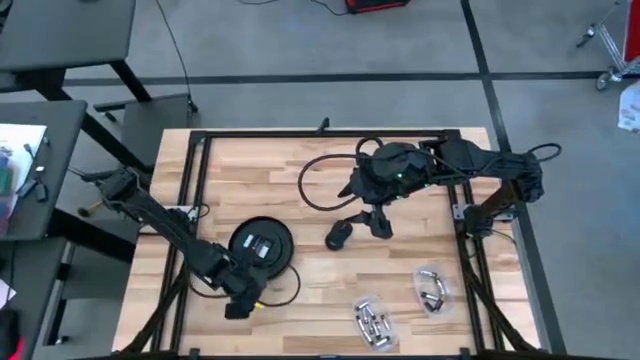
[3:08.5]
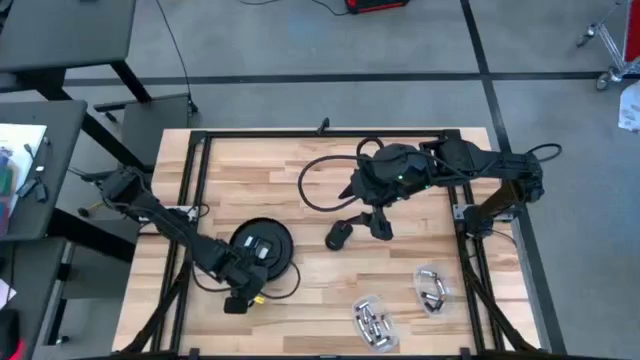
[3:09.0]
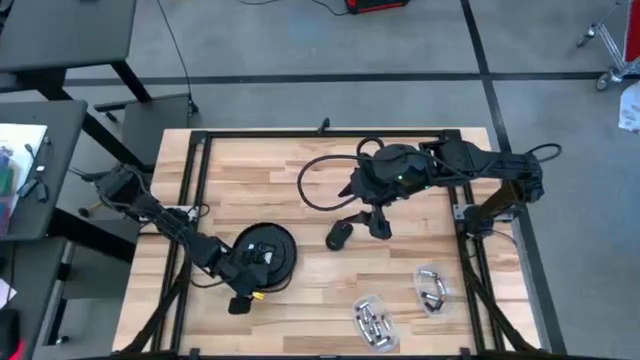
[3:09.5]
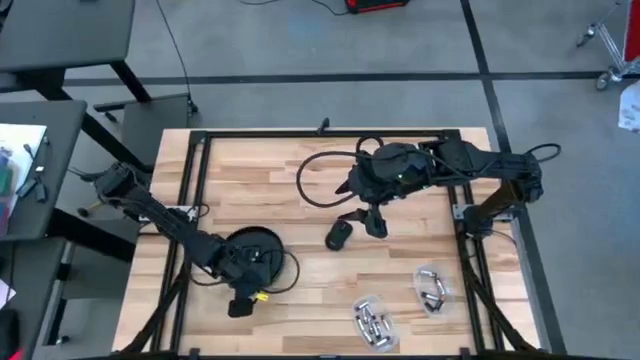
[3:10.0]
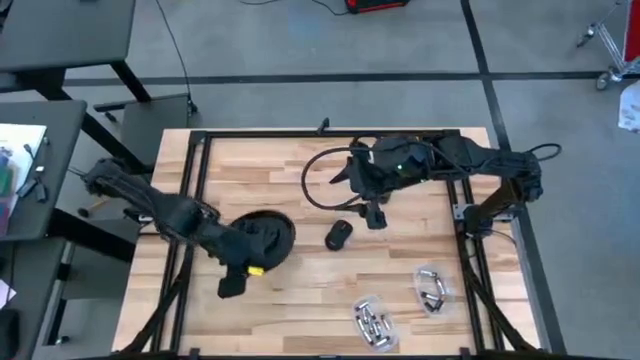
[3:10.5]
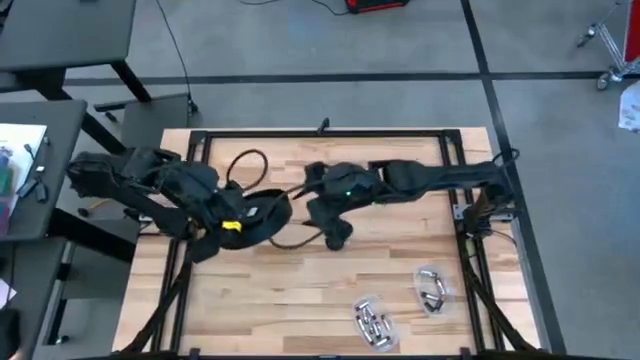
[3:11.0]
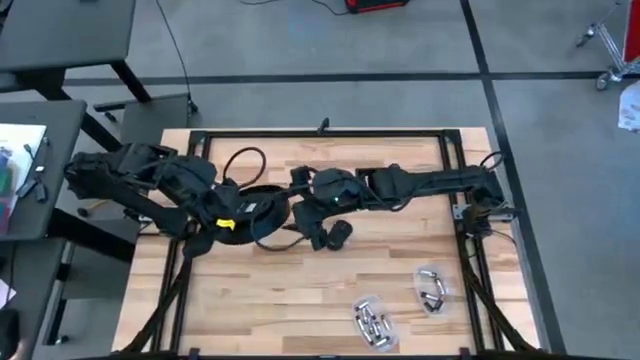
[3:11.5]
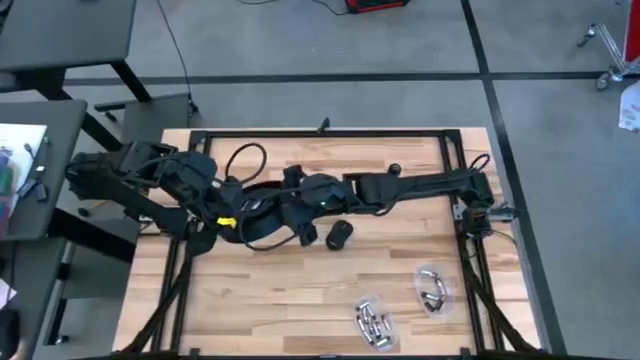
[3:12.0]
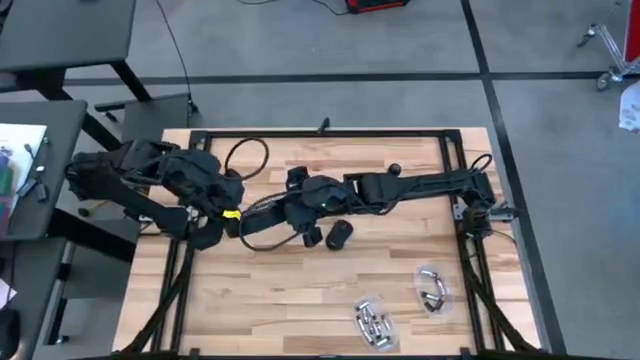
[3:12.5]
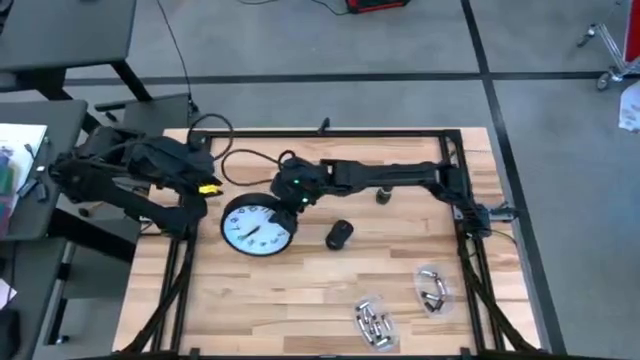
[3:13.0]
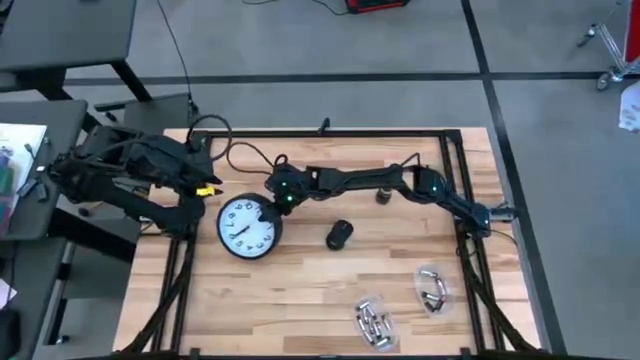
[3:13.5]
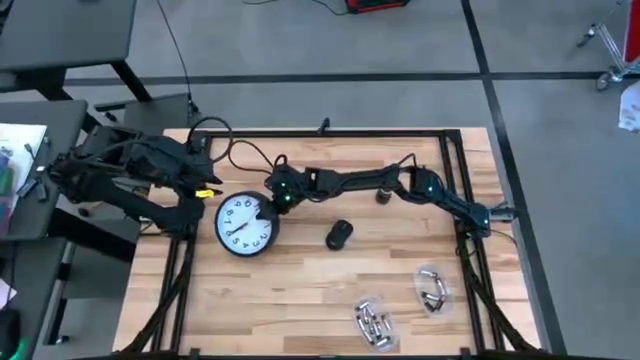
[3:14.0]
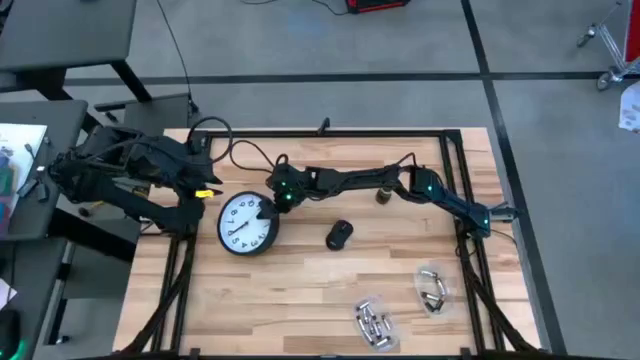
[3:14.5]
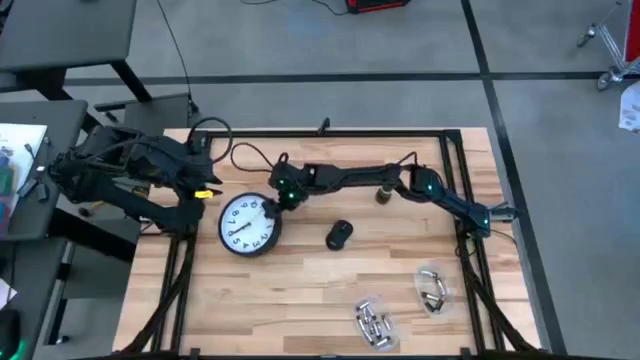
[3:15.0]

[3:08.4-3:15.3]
Task: Insert battery
Adjust the white wall clock

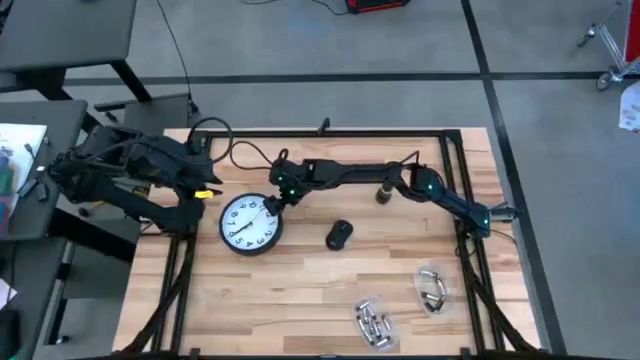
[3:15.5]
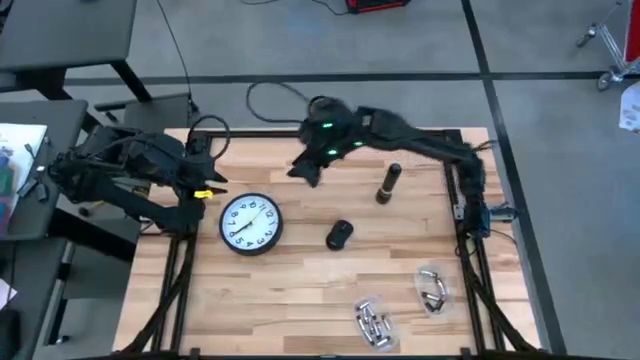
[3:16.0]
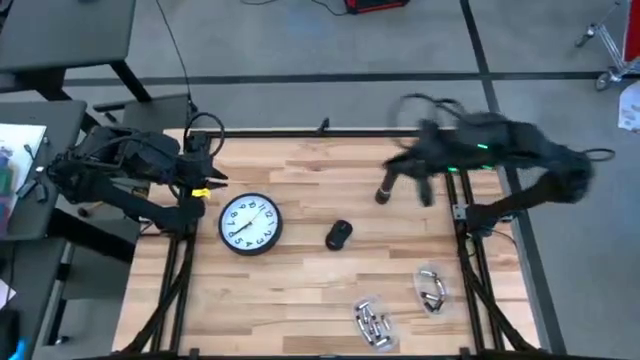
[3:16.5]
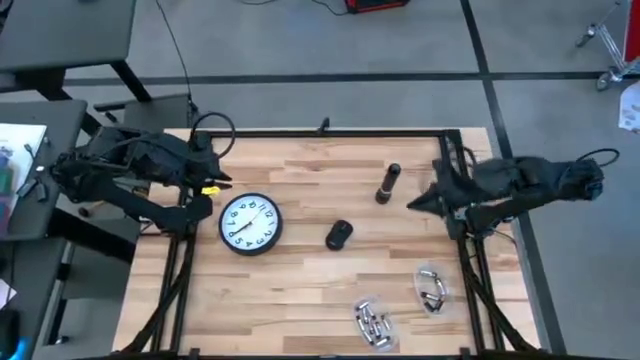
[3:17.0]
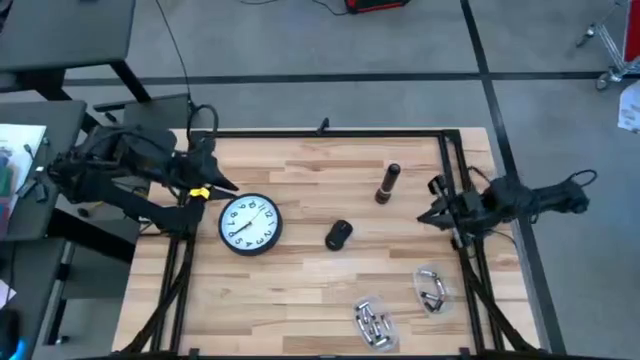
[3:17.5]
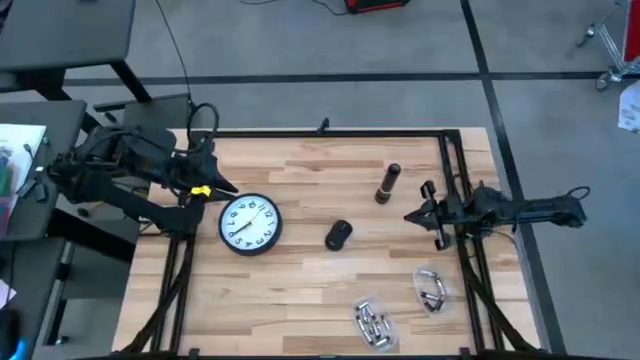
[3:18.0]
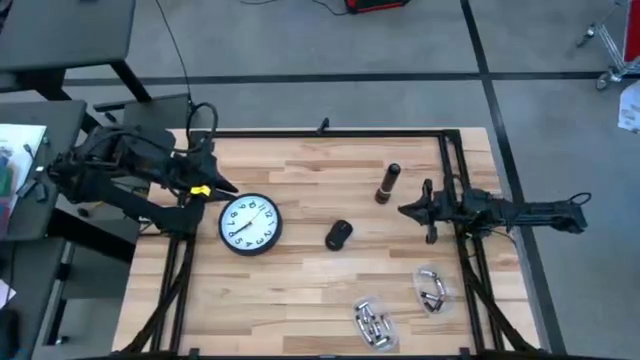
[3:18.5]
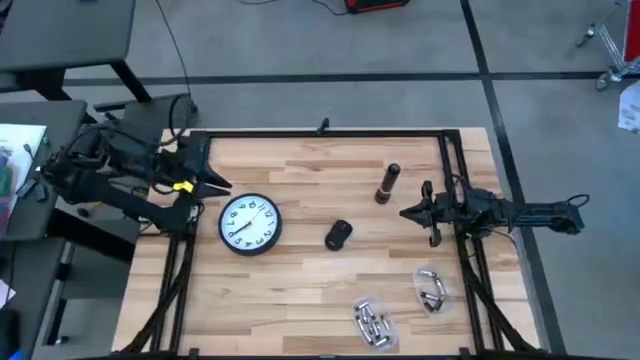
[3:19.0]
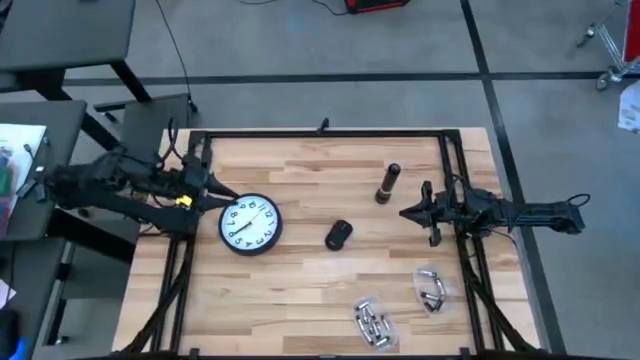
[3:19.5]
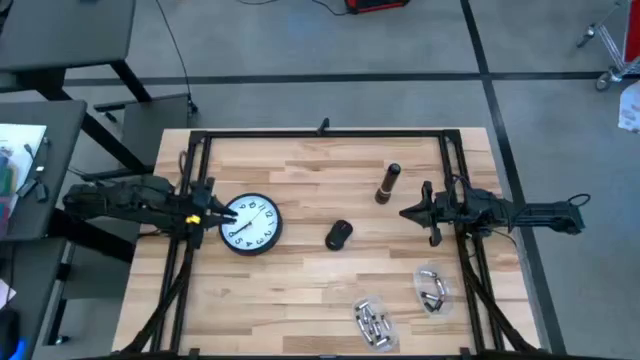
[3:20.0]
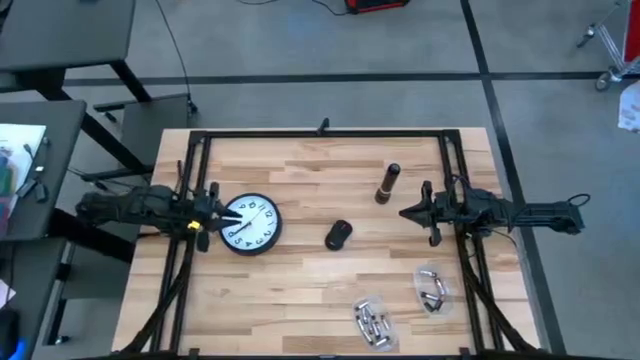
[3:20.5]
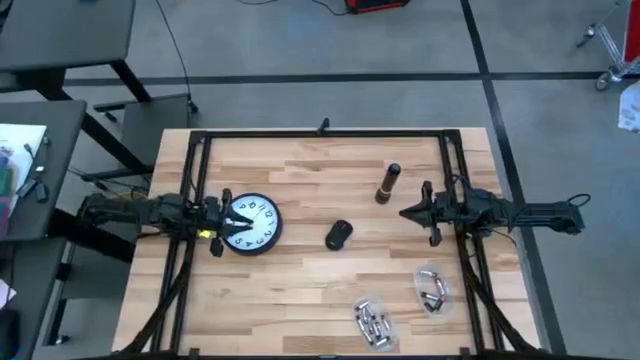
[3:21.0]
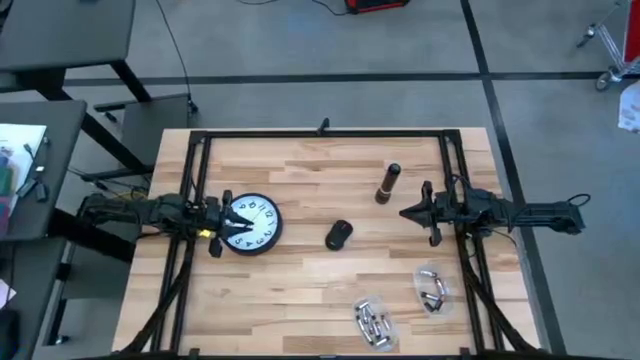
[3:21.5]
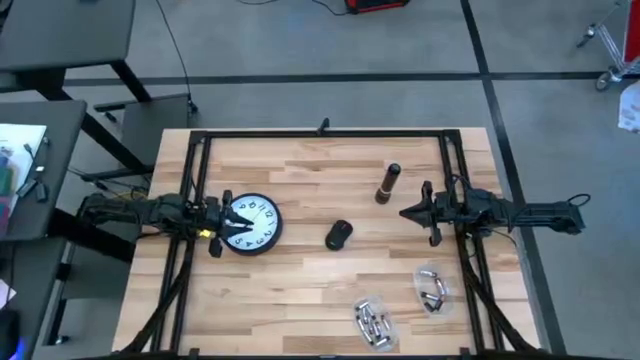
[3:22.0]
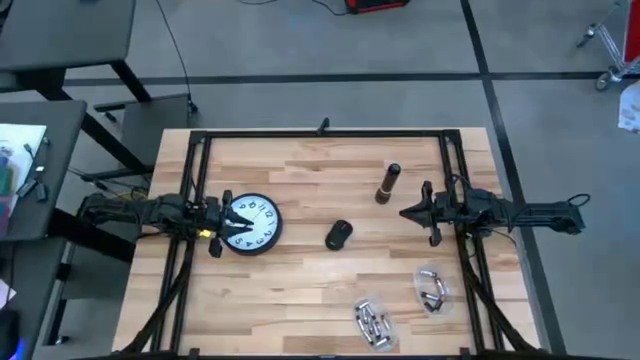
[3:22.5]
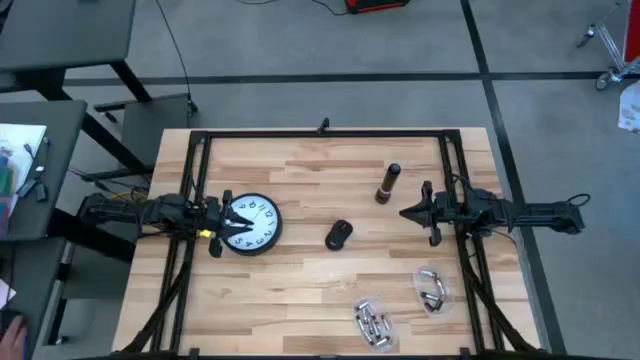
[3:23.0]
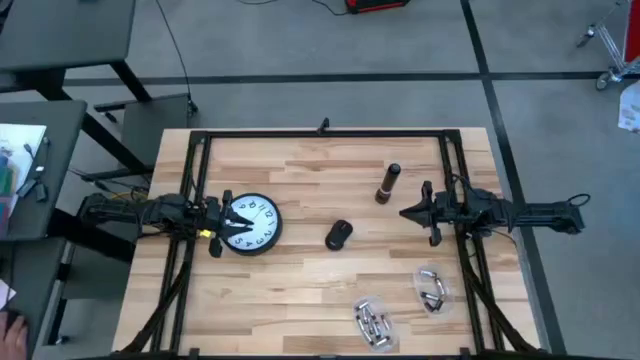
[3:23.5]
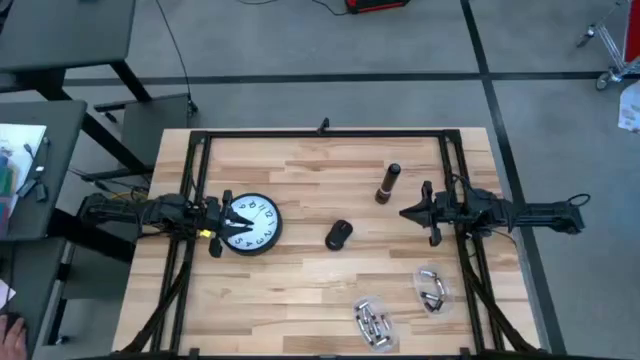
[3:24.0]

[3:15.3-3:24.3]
Return to Home Position

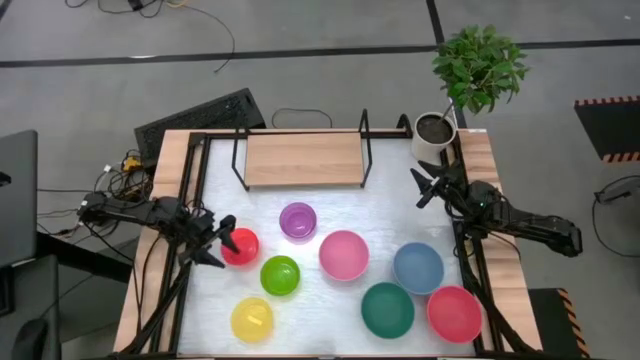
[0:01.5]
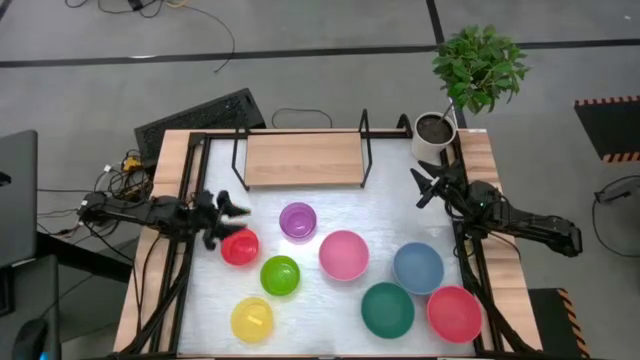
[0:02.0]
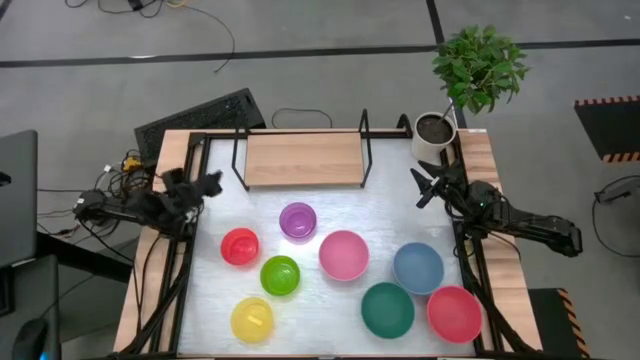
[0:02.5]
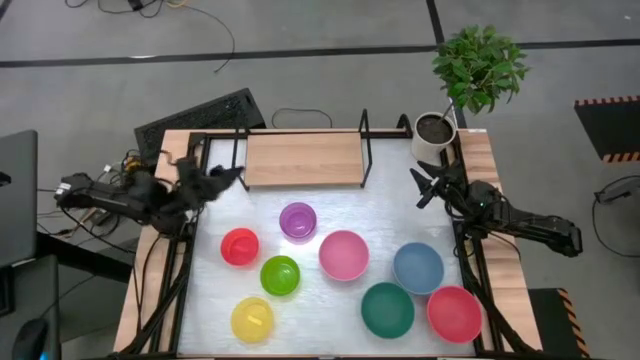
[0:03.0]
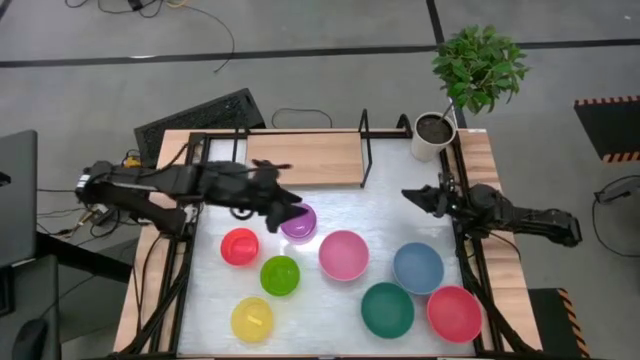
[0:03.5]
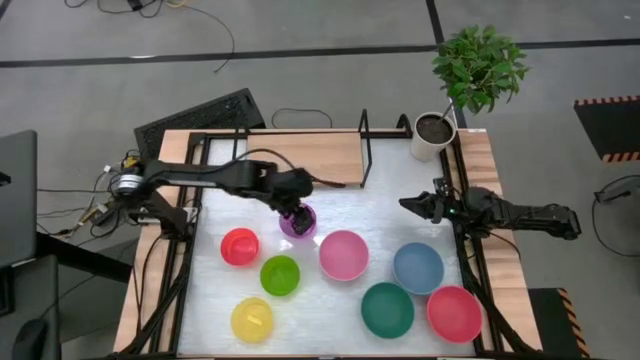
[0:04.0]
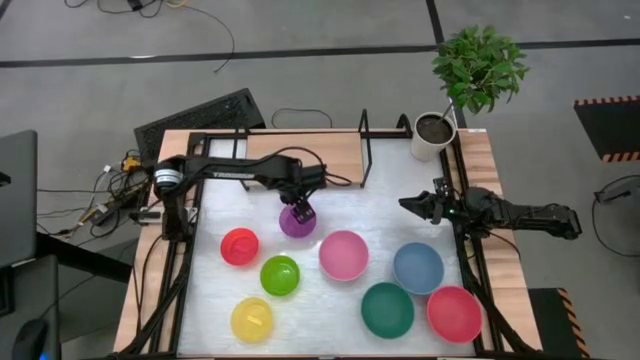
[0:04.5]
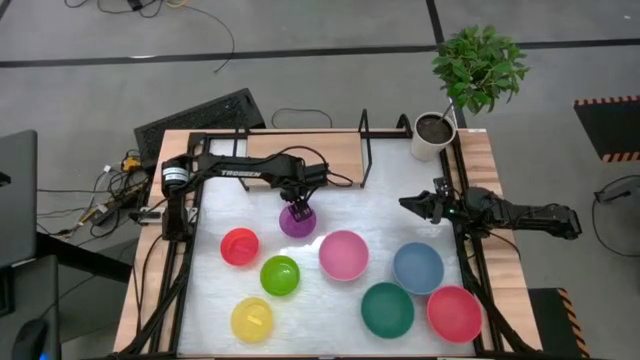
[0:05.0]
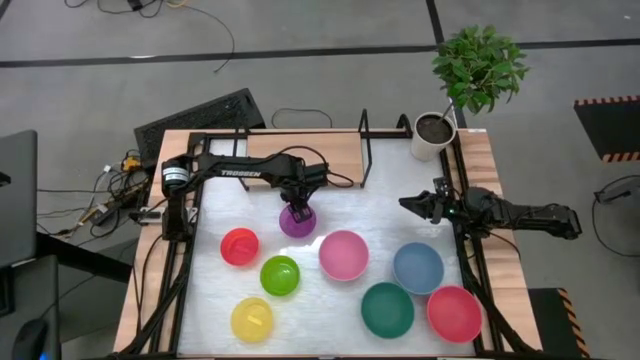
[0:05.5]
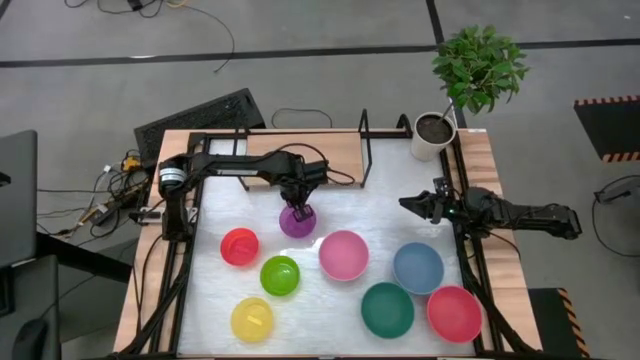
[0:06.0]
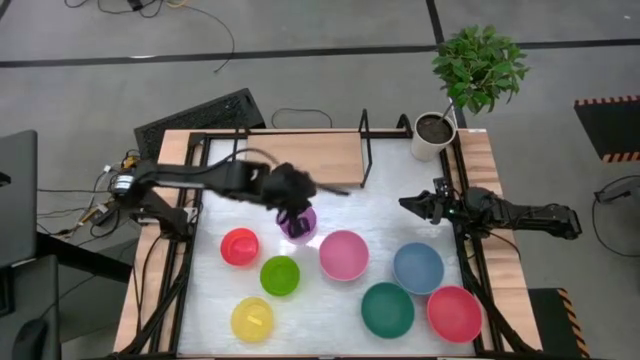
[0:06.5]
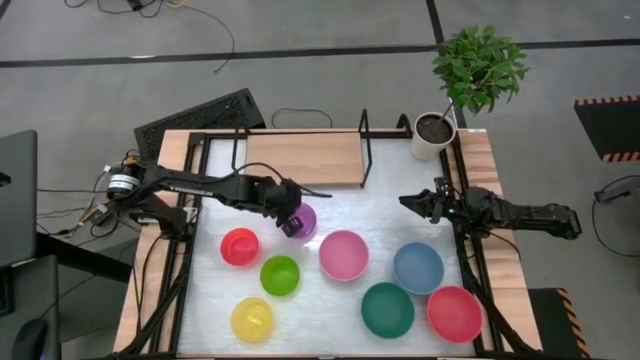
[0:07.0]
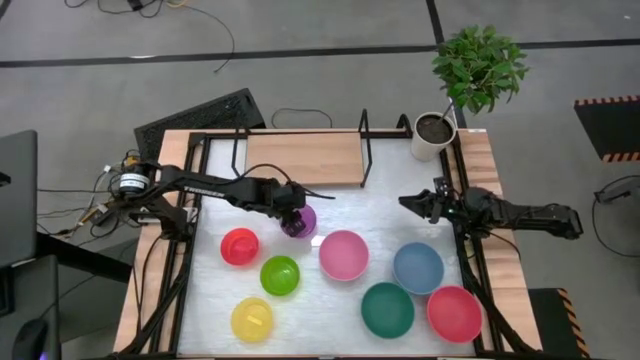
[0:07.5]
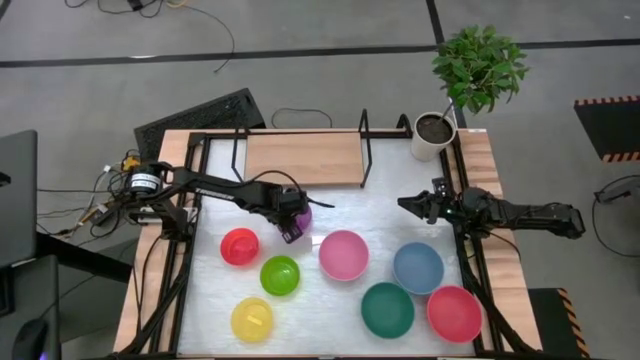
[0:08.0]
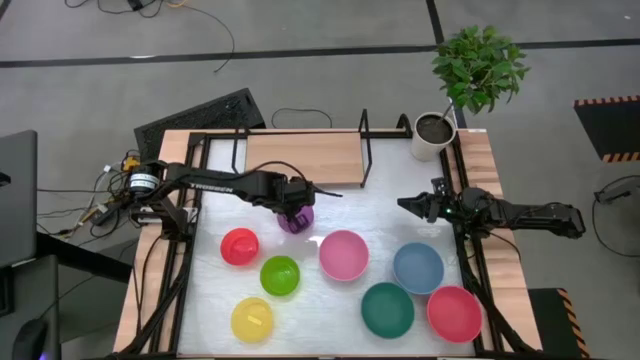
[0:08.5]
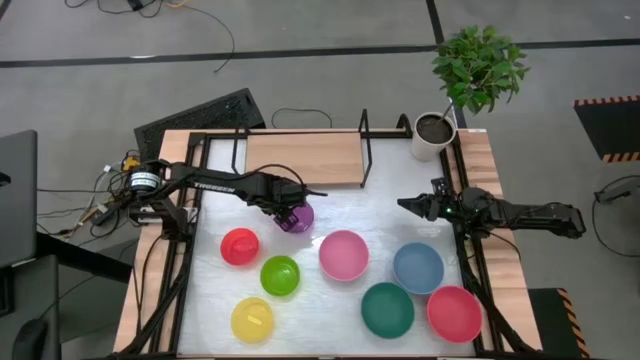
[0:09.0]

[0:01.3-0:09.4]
Task: Place and stack bowls onto a shelf
Put the purple transparent bowl on the shelf
